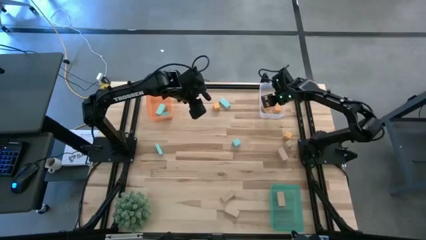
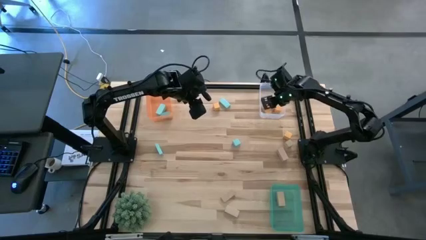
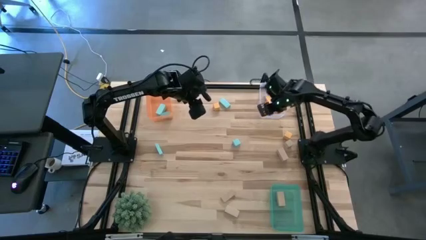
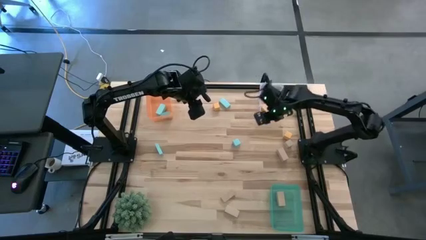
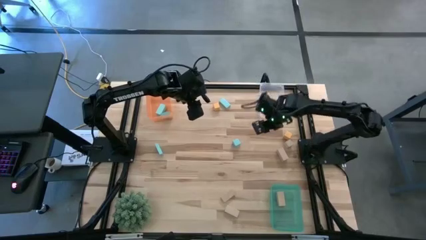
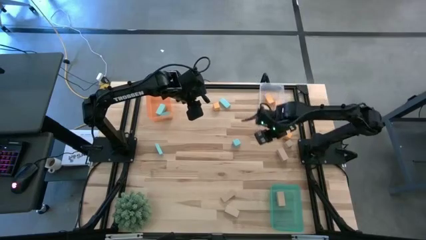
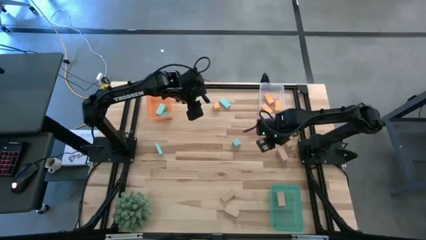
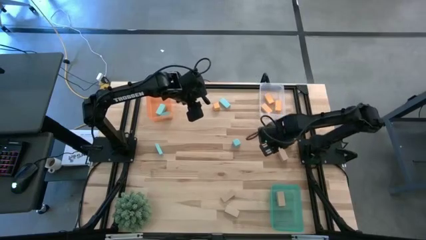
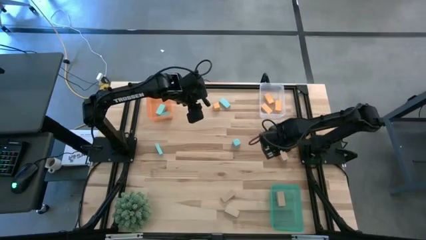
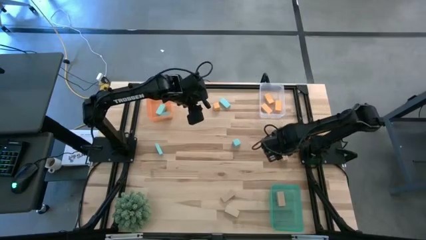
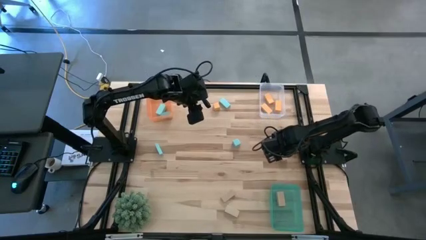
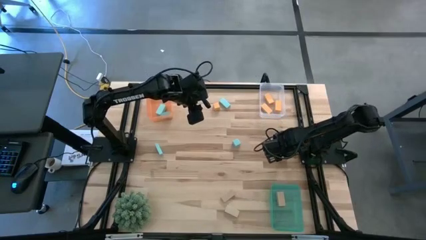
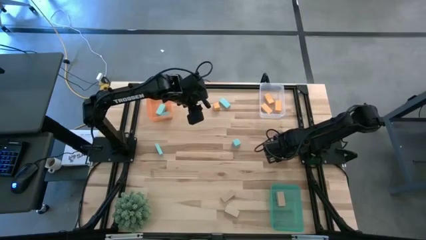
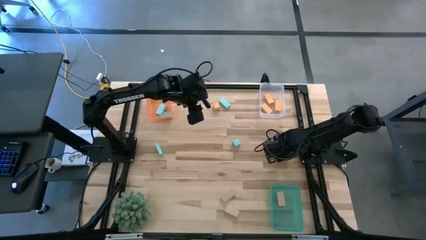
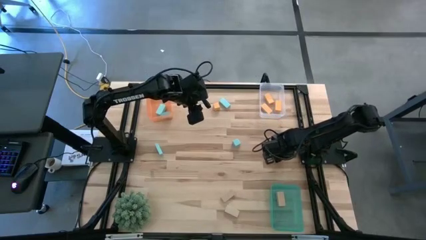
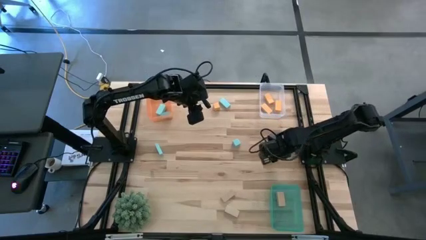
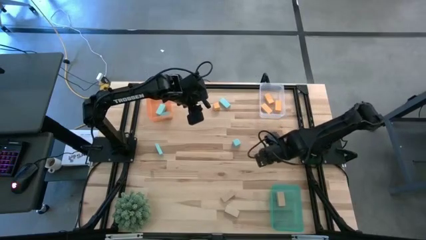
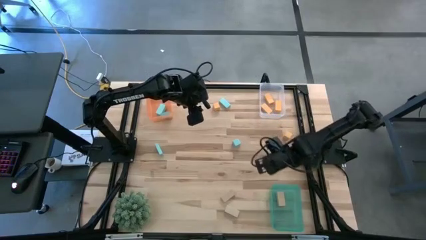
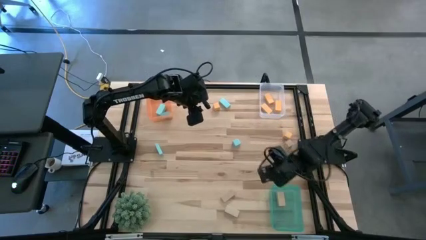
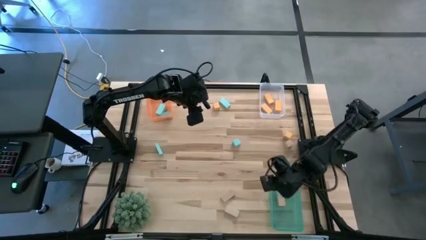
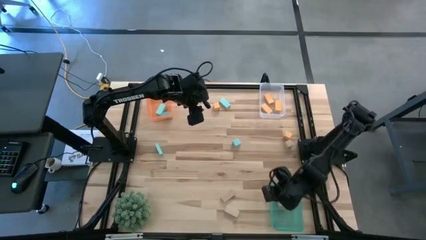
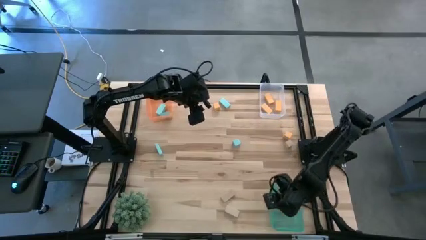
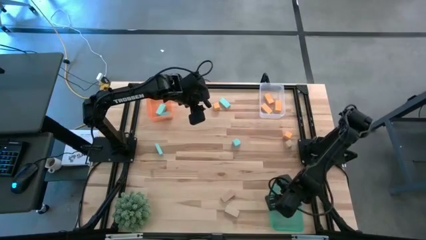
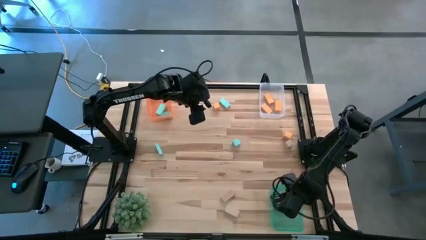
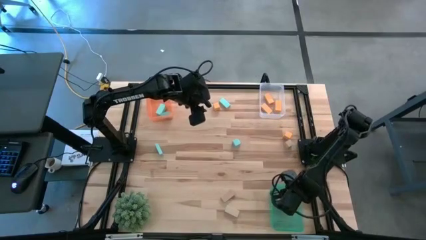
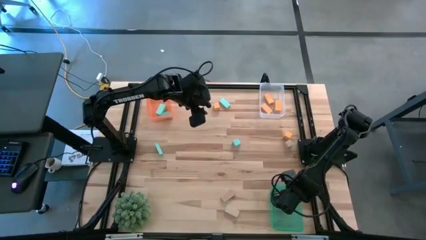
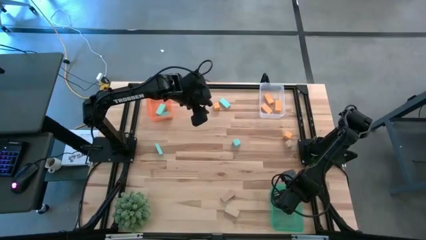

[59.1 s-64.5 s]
Task: Sort & place blocks by color
Put the brown block into the light green bin

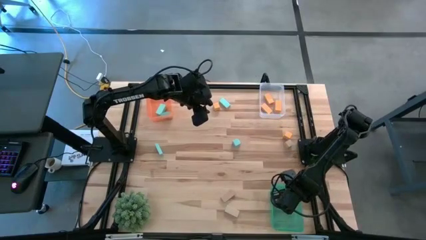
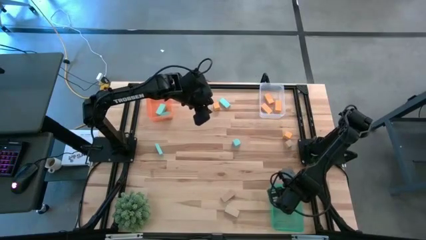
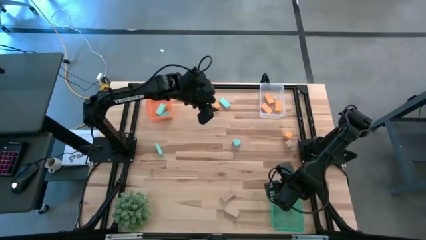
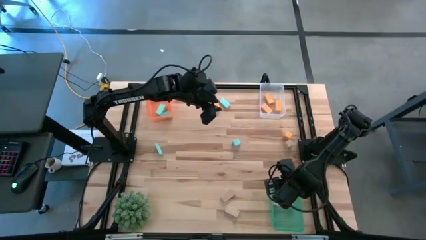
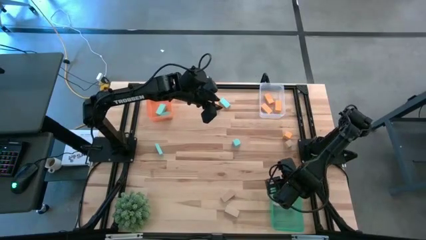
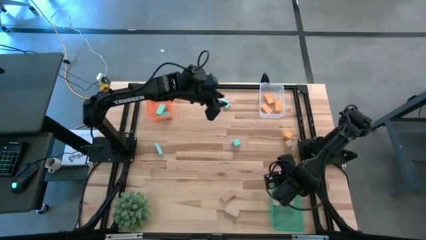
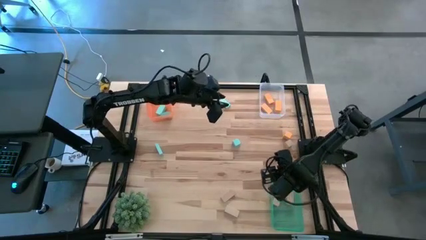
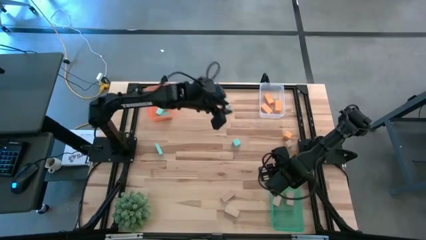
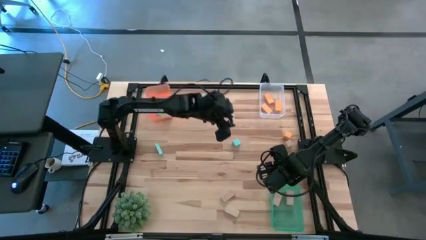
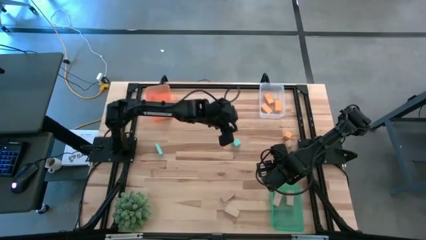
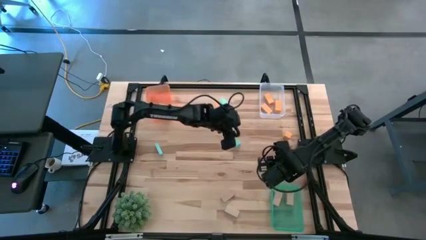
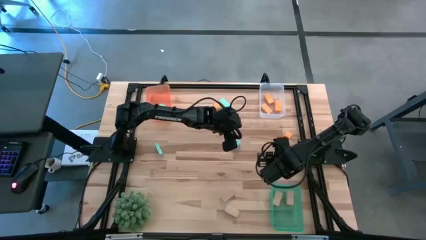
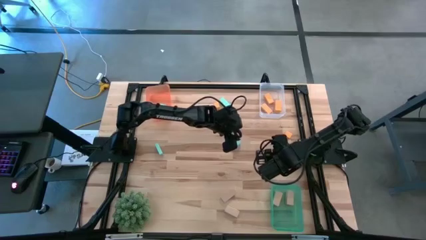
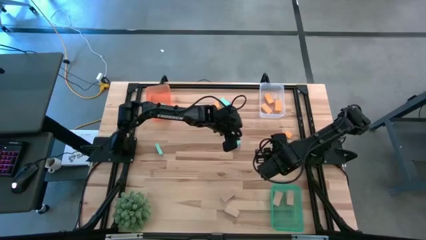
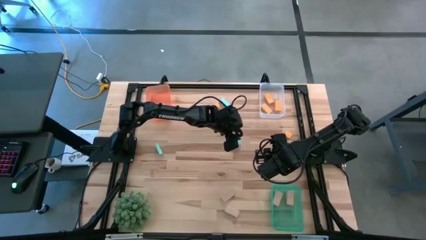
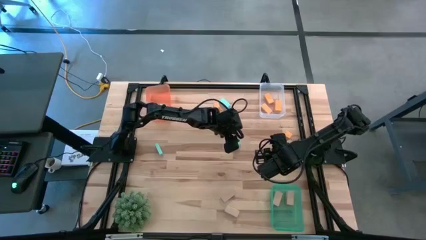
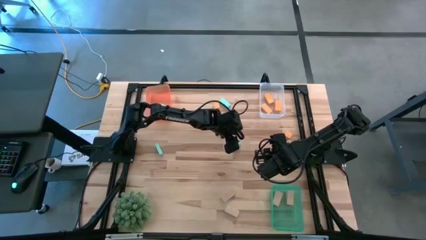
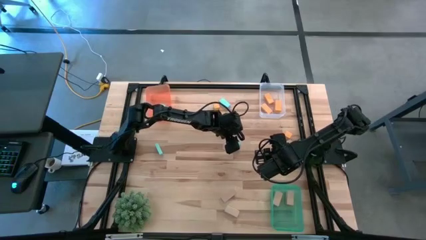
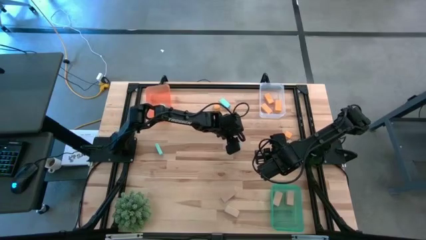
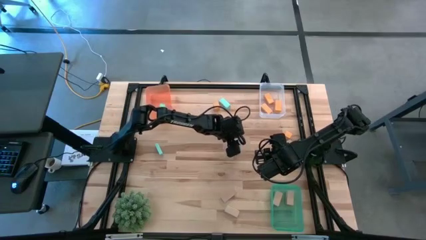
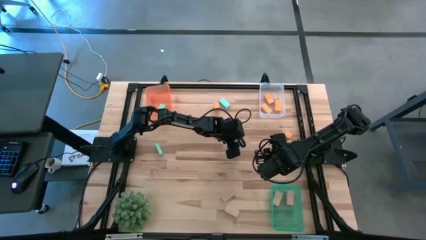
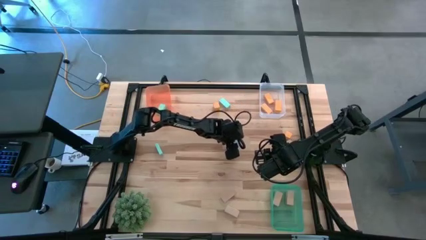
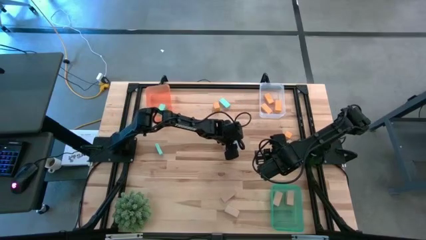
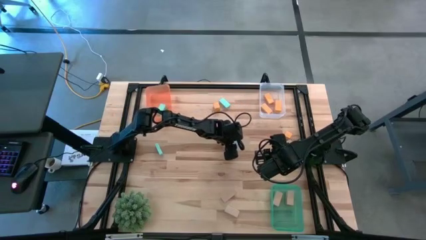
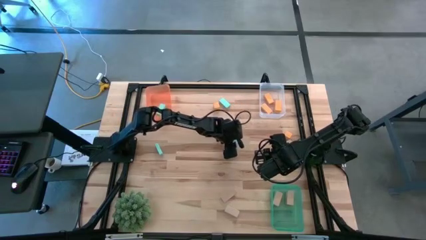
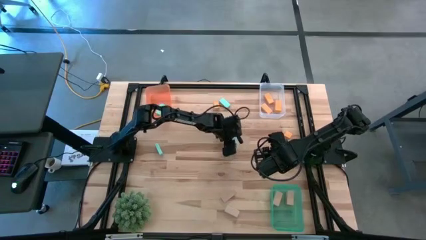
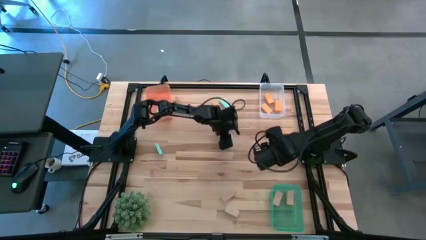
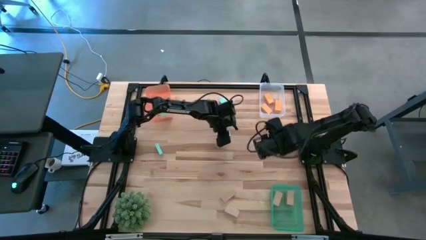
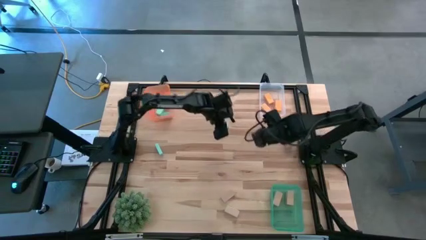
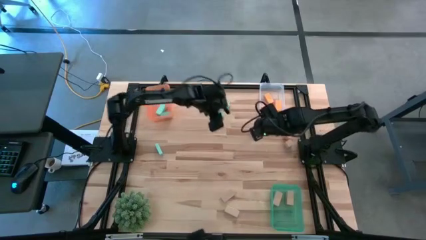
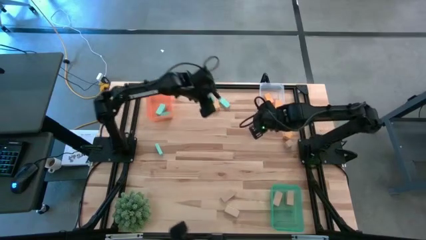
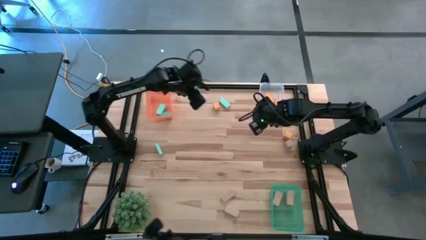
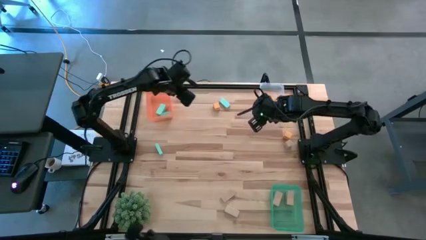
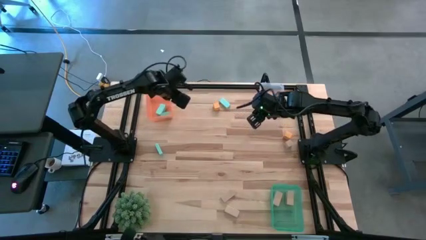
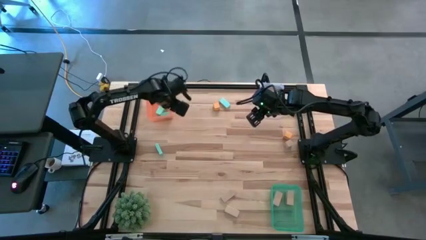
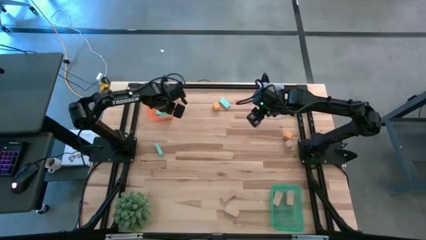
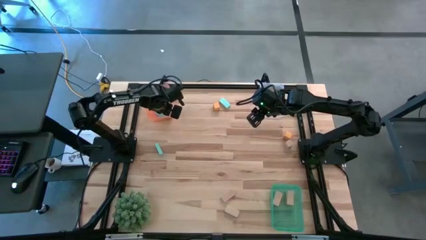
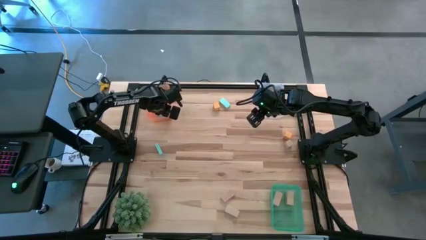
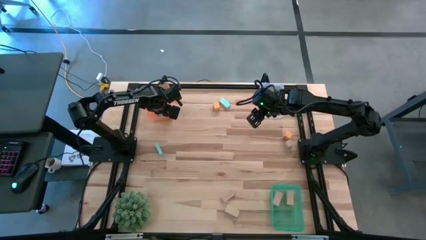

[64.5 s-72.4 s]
Put the blue block into the orange bin

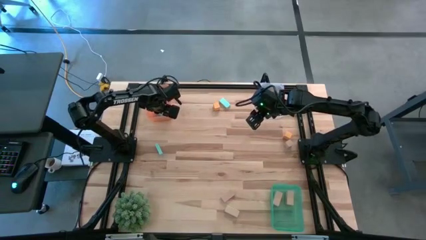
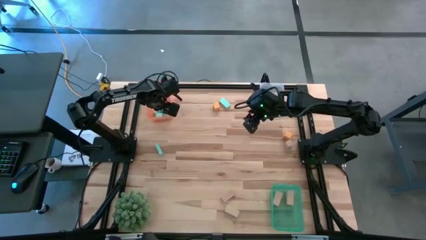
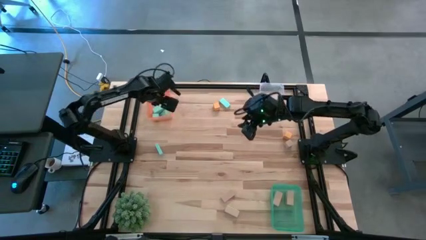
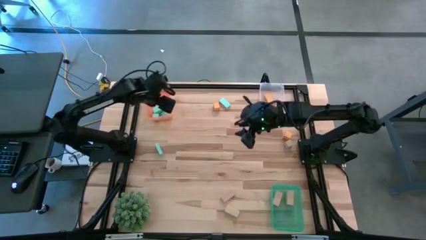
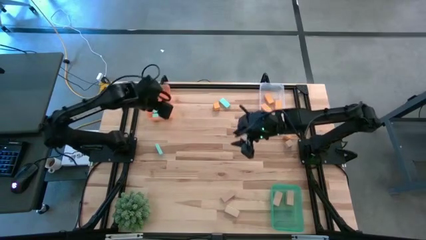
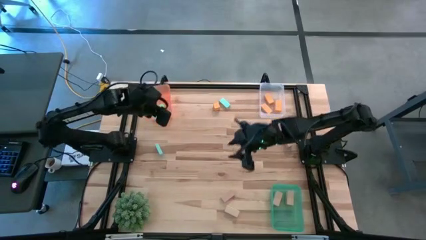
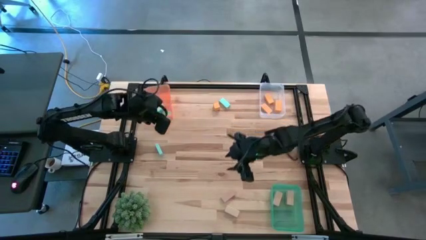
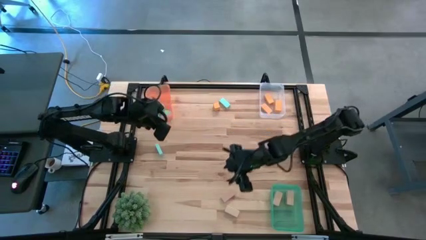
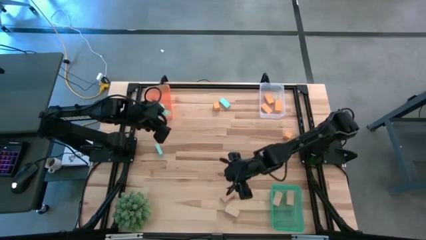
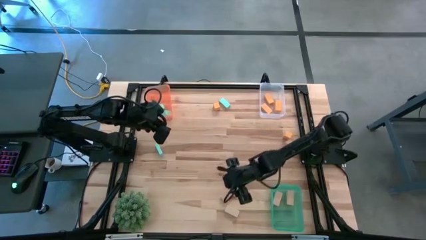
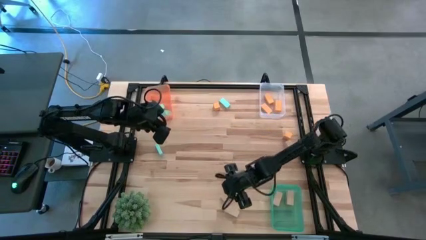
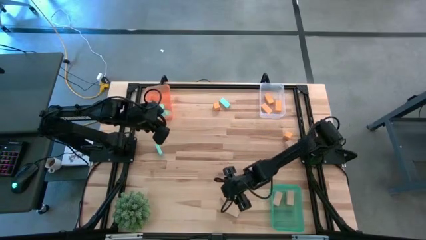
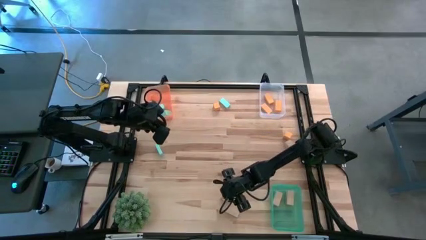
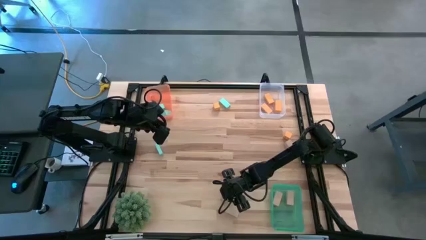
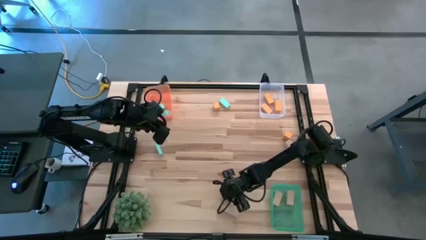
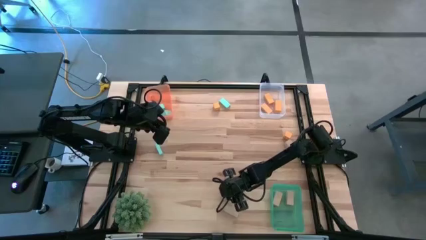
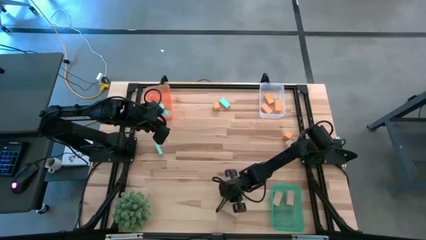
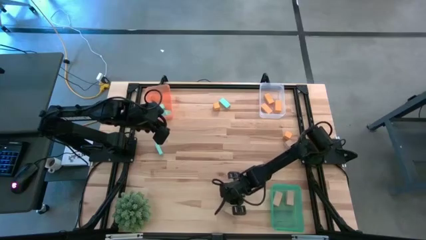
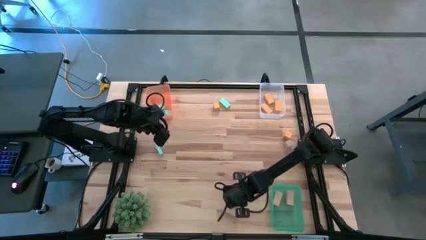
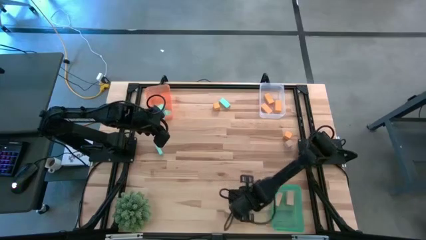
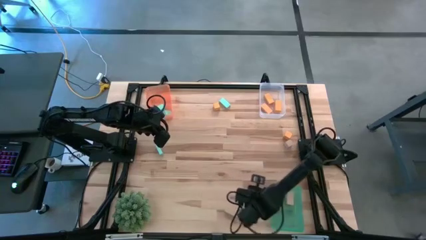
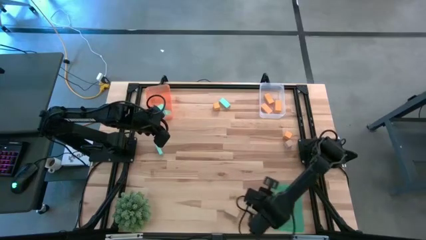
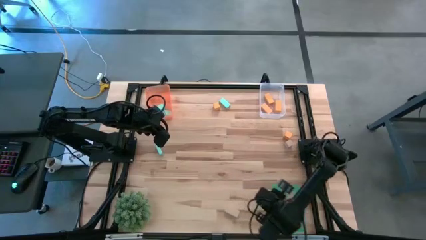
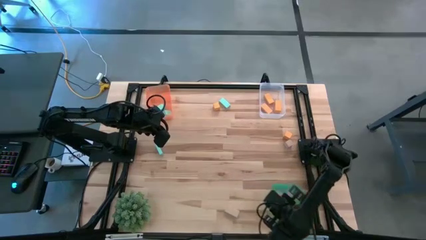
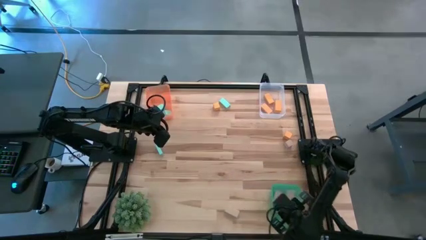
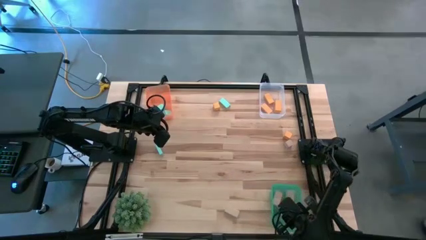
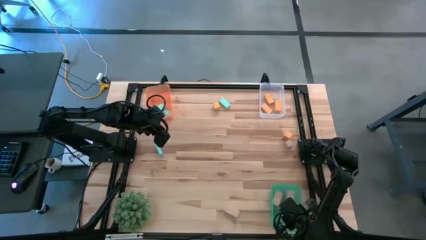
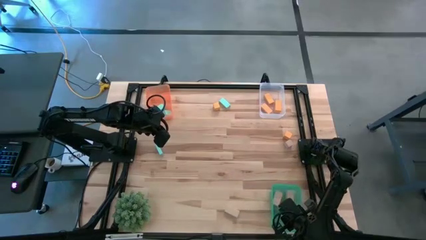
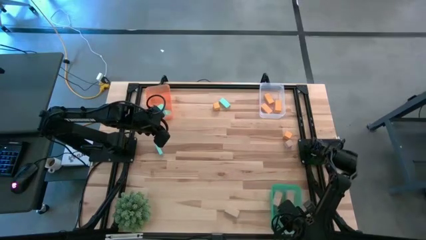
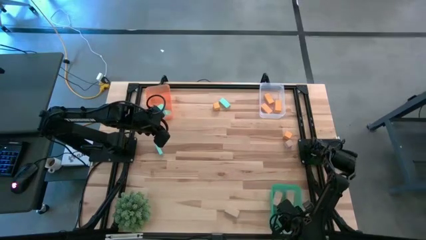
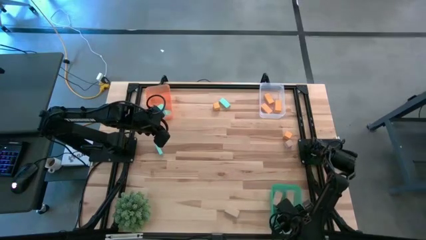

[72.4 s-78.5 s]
Put the brown block into the light green bin
